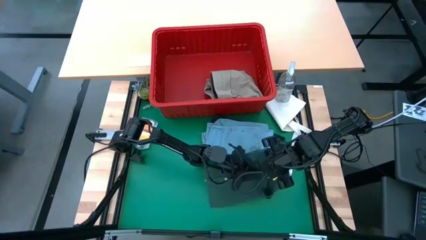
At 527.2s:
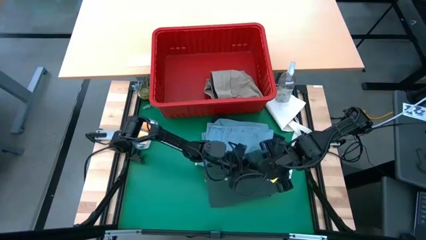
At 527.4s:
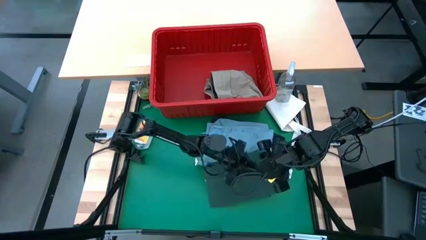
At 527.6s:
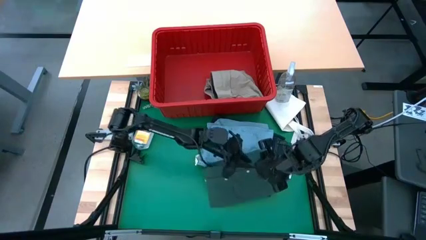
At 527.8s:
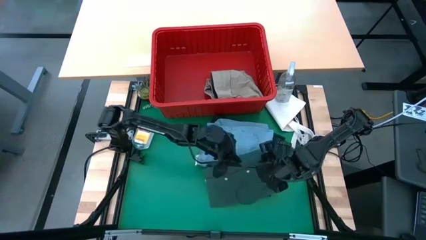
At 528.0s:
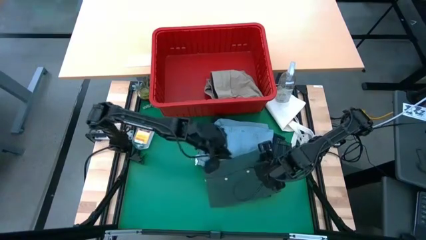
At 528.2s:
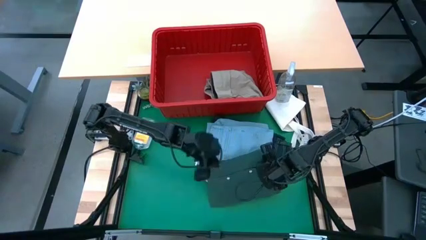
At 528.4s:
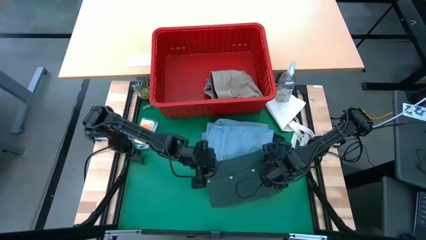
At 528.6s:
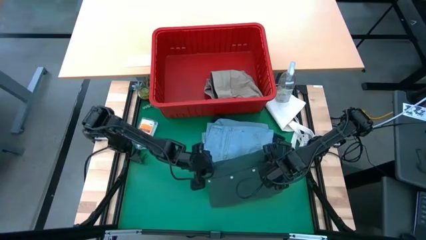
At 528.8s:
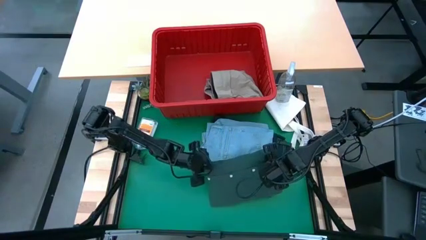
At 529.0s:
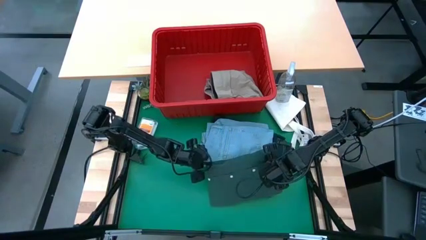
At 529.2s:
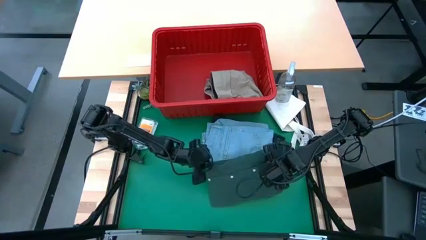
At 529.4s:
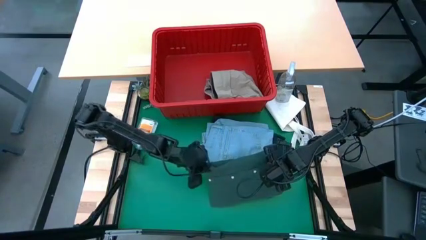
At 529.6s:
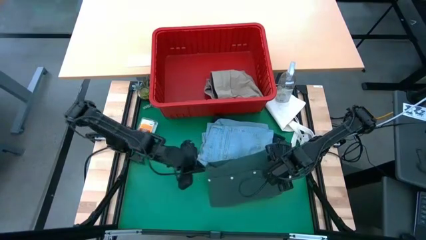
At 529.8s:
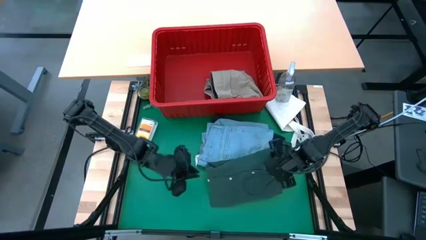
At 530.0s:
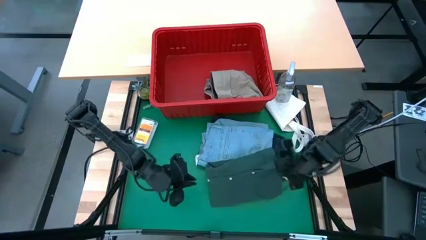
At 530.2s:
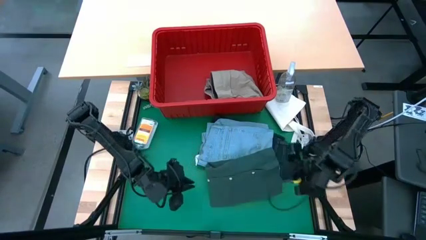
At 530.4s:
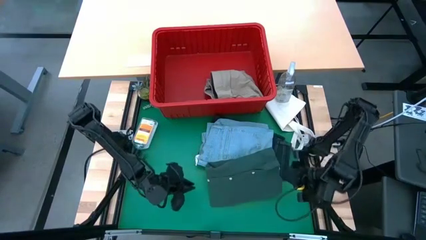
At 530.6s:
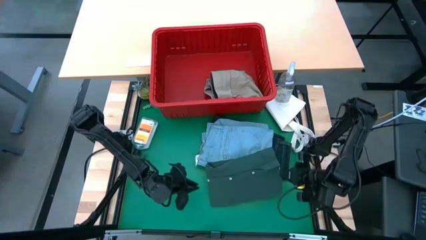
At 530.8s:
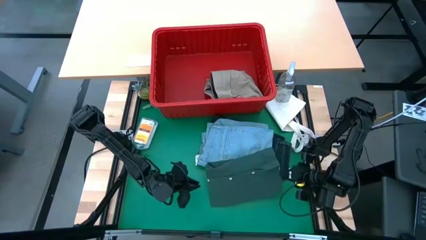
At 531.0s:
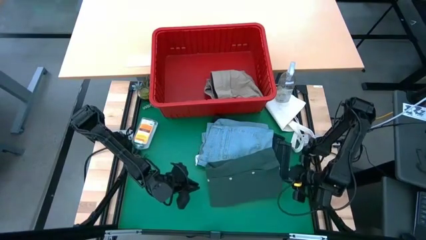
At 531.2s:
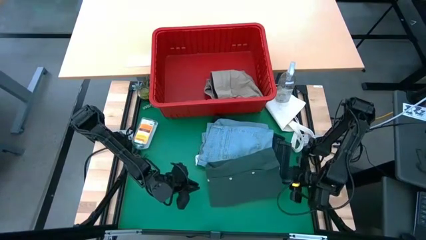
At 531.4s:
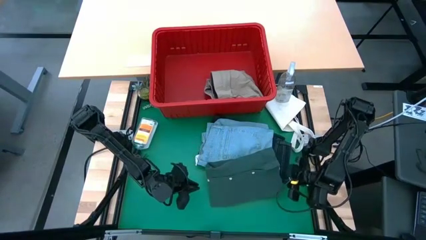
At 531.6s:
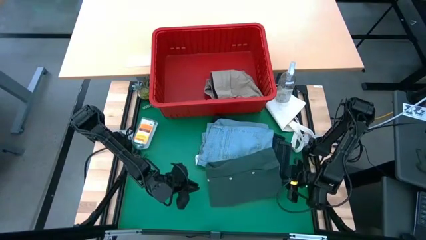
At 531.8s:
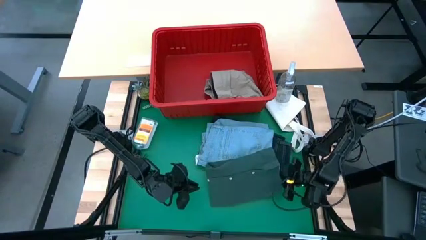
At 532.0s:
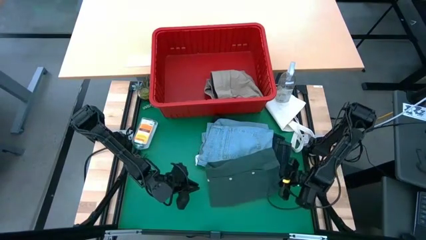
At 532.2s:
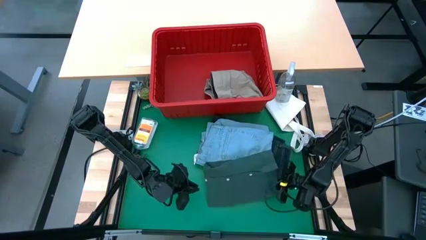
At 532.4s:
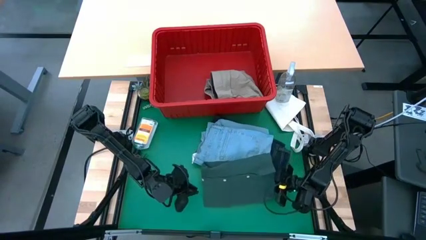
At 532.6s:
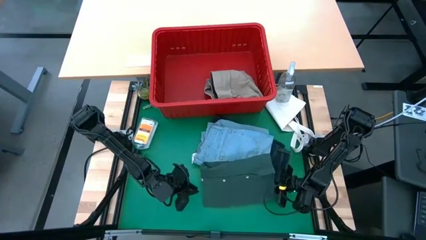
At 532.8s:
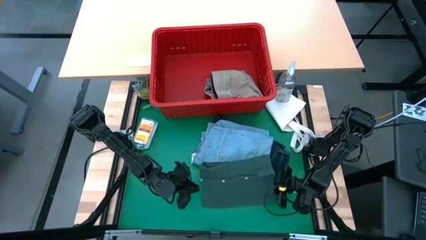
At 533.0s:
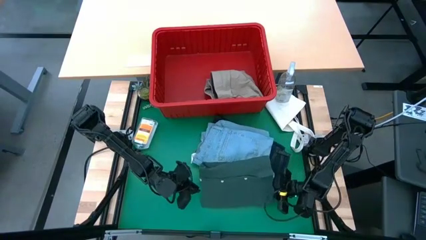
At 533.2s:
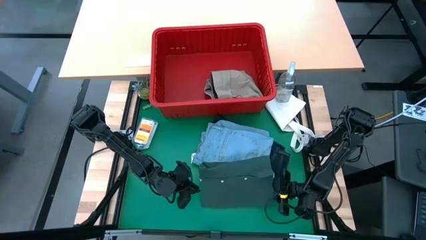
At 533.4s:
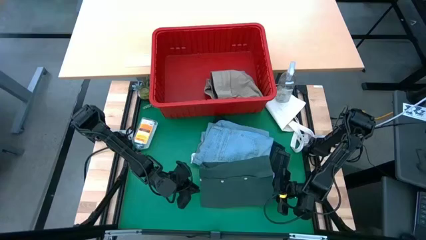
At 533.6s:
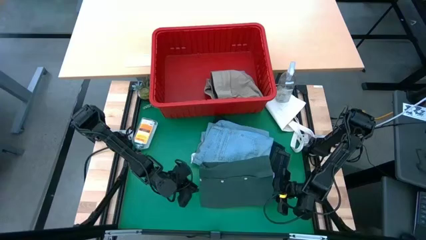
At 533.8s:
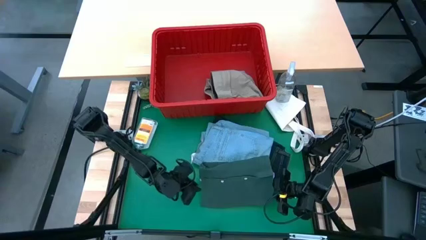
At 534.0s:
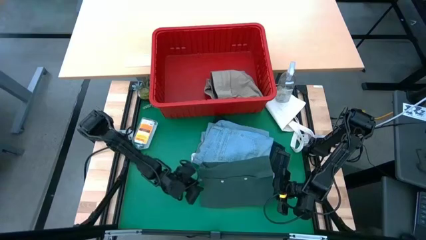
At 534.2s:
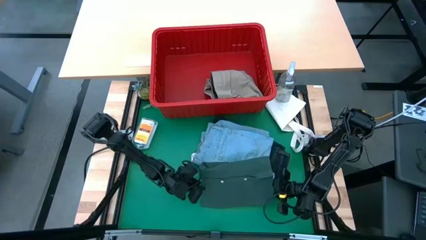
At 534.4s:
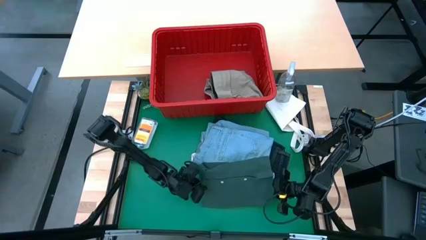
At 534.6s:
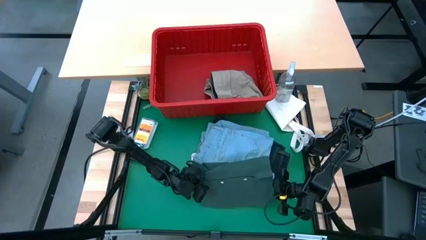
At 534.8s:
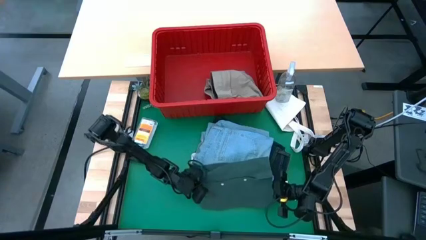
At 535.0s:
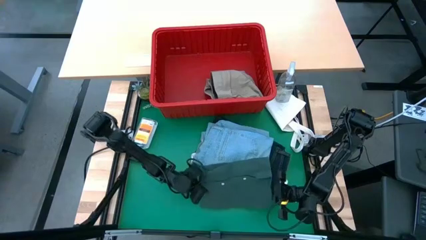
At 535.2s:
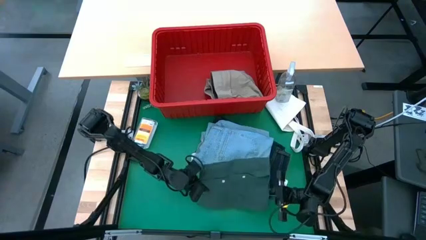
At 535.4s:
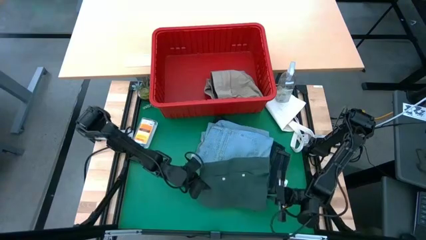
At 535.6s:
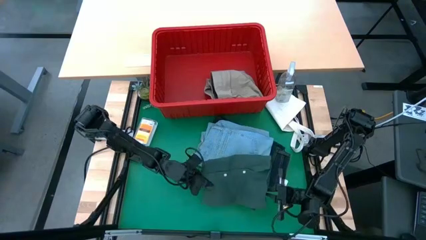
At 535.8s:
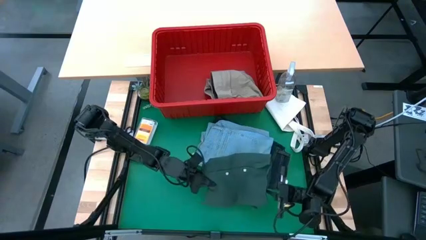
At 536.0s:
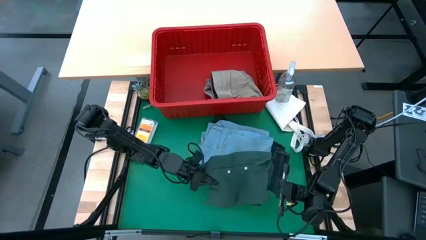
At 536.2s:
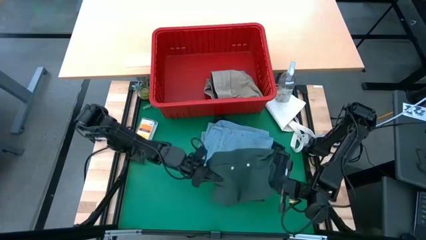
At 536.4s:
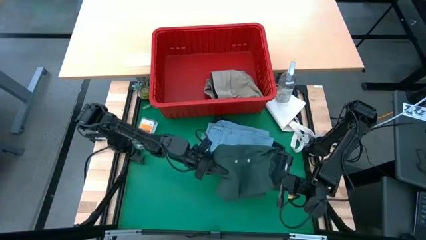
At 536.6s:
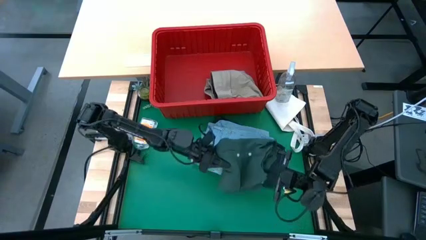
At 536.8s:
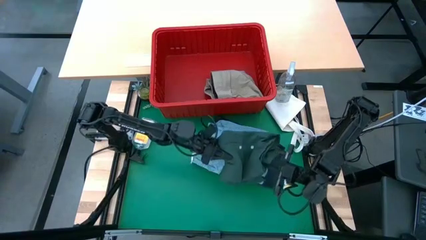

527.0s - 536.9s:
Task: Fold laundry
Stack the green shirt on top of the light blue jeans

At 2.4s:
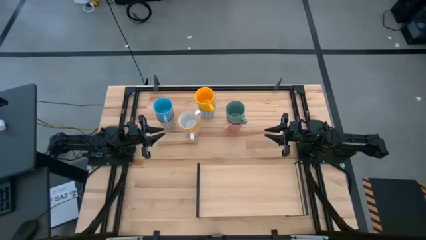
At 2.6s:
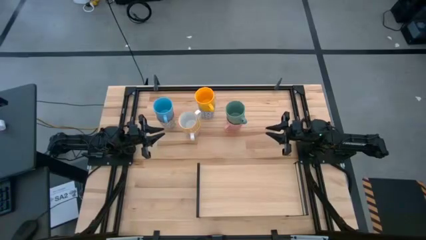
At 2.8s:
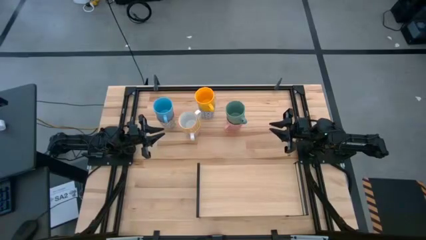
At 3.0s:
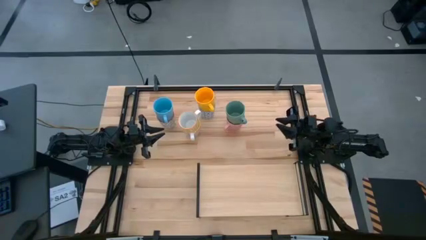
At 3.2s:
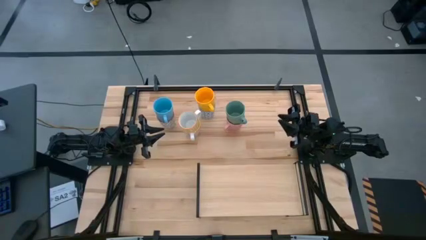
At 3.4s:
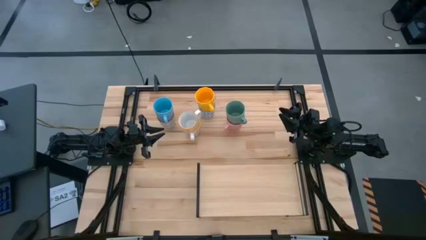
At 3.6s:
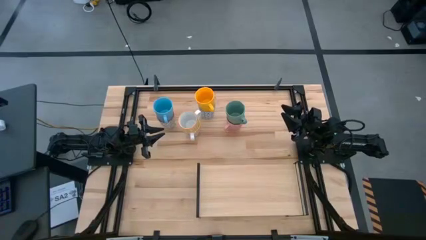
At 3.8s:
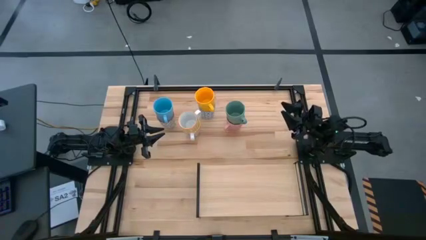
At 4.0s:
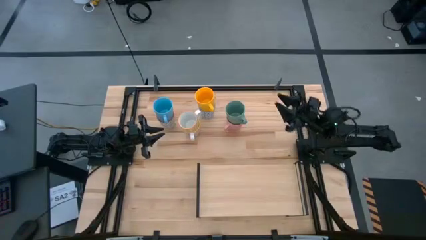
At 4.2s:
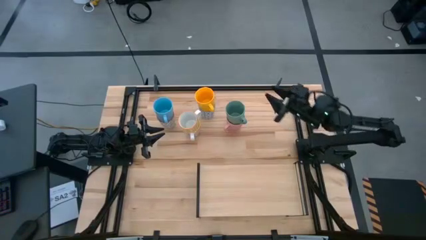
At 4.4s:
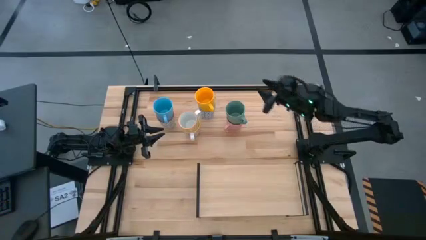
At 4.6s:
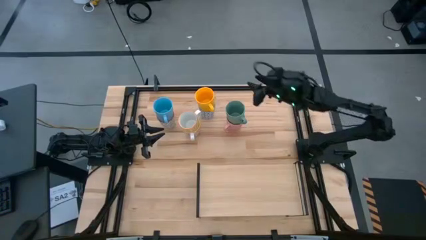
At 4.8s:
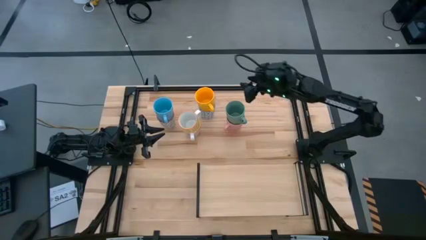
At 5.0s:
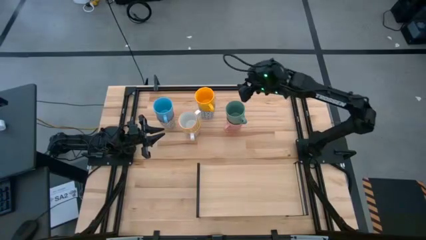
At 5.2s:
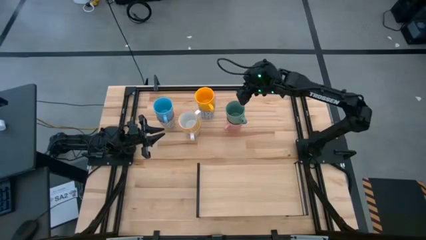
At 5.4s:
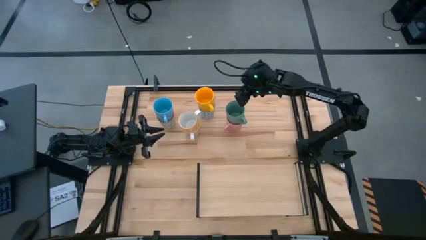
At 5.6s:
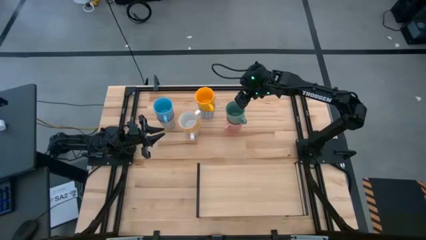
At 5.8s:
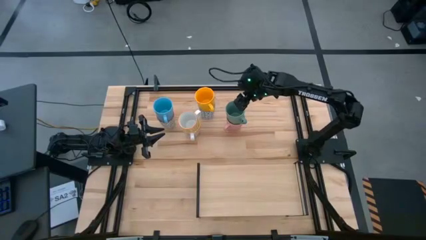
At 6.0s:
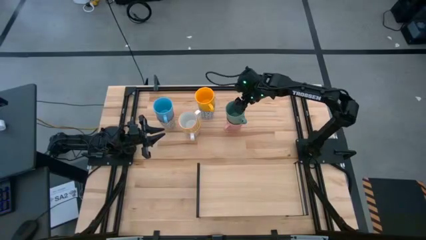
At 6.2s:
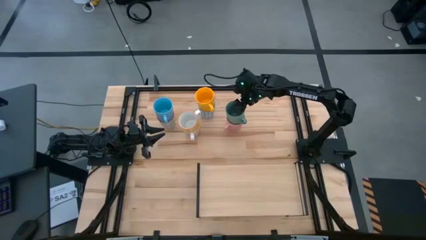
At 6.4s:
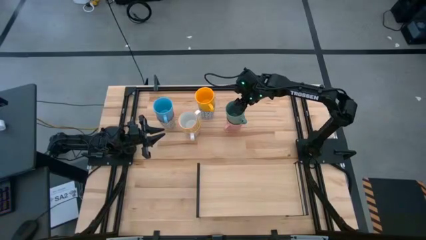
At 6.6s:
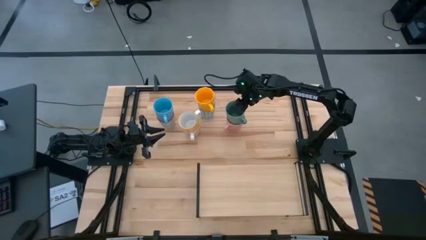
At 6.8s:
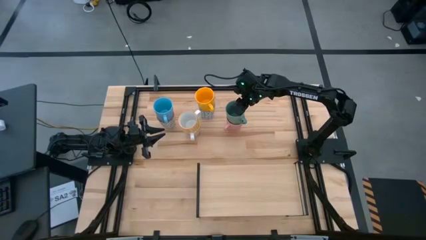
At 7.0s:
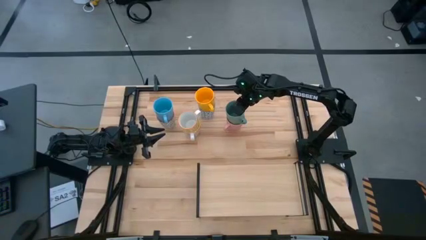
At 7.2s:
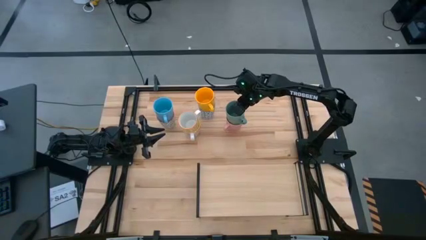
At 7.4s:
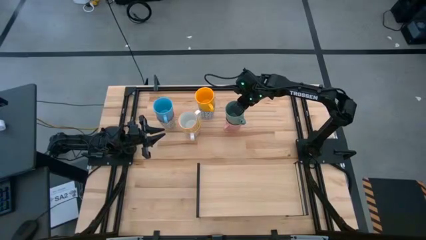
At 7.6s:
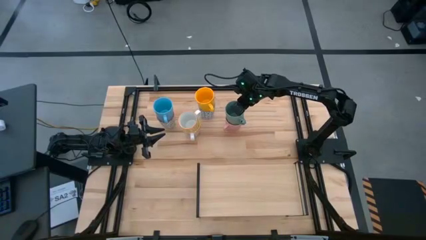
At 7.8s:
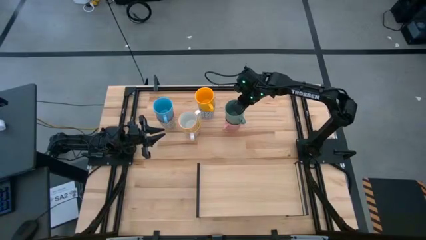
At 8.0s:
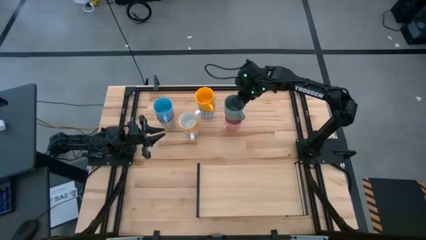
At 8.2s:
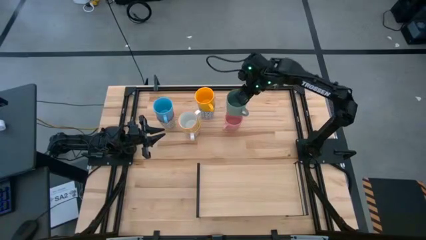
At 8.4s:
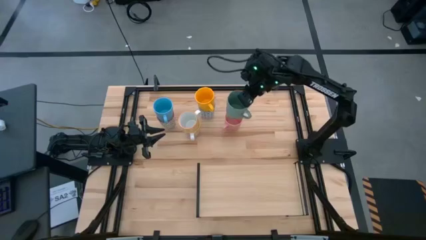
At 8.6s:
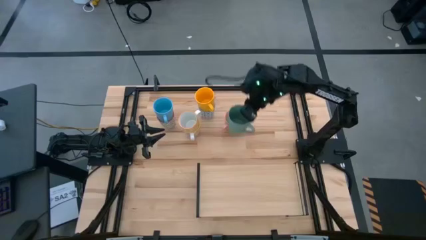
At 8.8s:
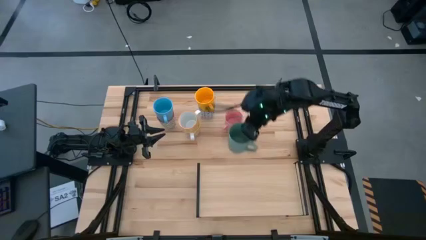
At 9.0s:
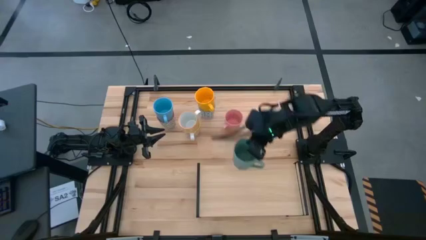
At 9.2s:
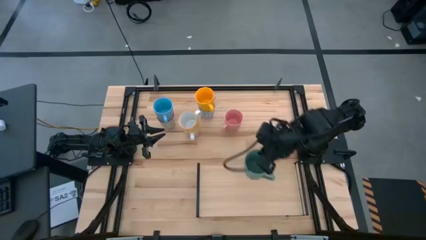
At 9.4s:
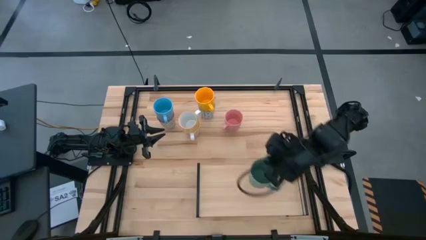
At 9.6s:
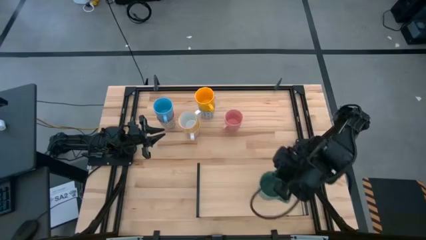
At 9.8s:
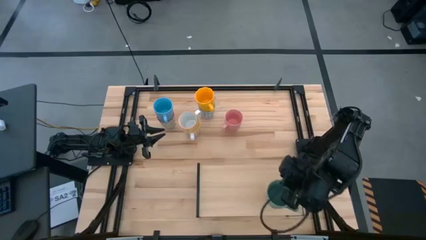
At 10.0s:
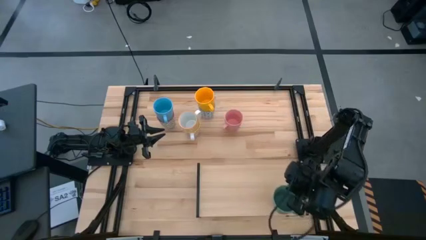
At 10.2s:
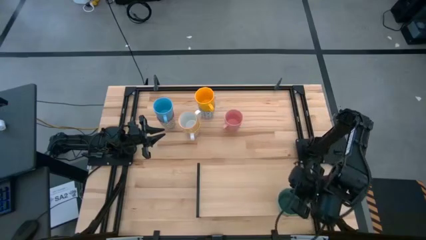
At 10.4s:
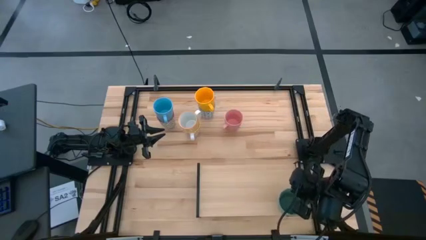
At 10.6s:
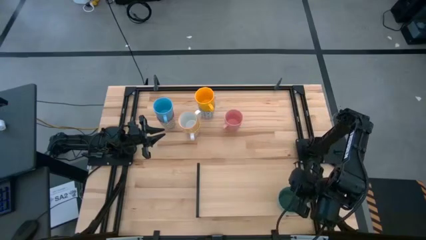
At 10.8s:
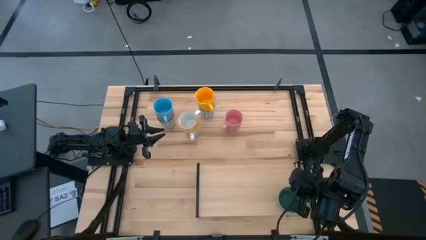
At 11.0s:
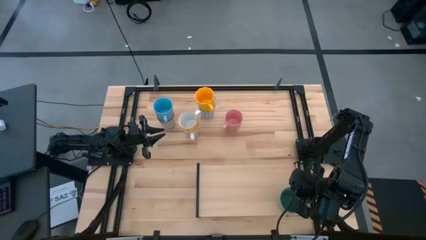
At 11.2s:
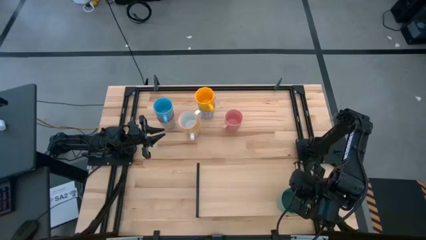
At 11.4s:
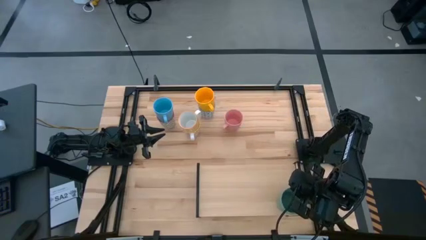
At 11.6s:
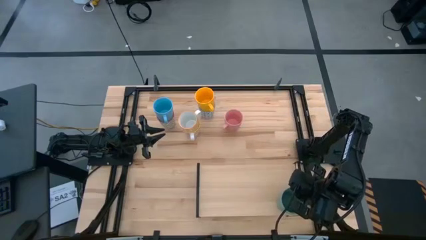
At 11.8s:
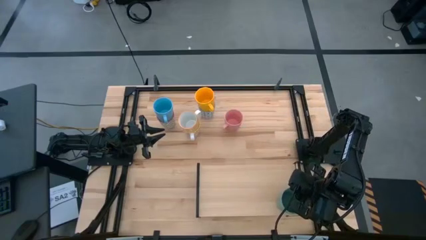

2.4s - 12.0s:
Task: Place coffee mugs
Put the green mug on the shelf
